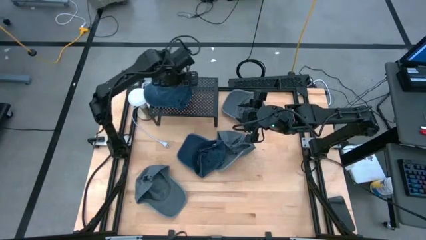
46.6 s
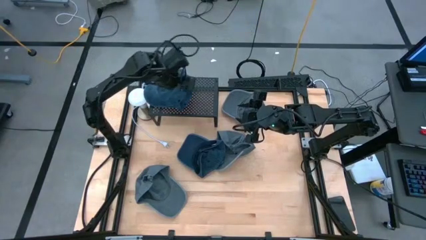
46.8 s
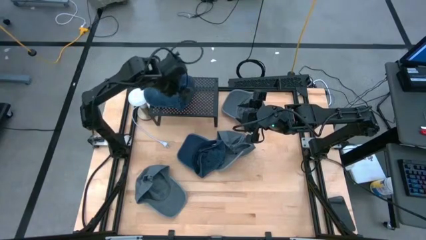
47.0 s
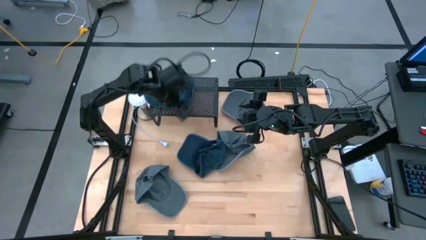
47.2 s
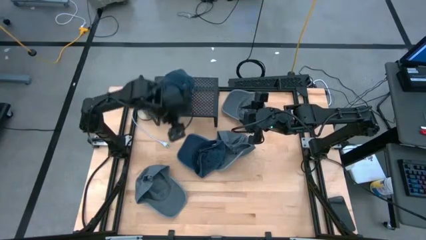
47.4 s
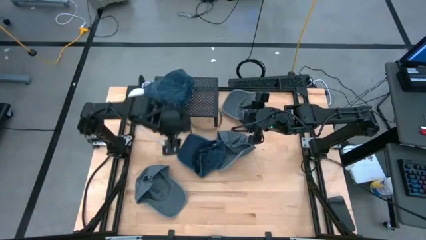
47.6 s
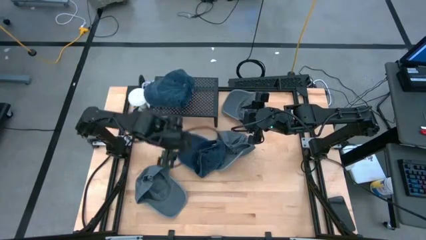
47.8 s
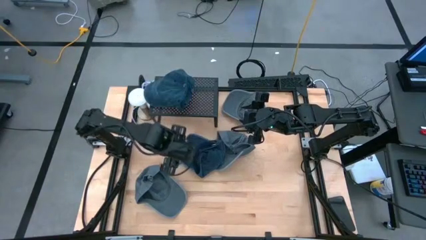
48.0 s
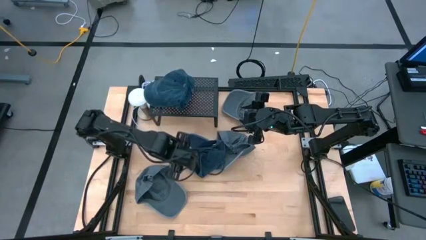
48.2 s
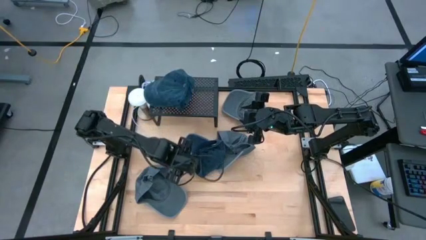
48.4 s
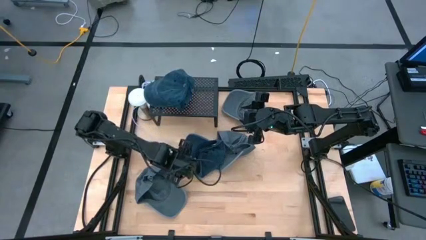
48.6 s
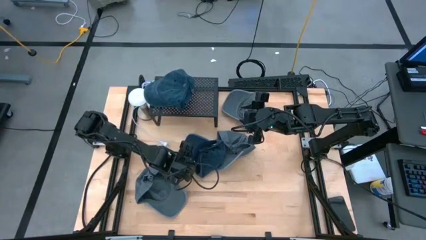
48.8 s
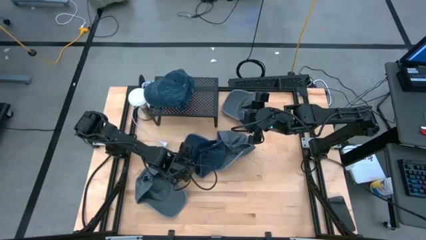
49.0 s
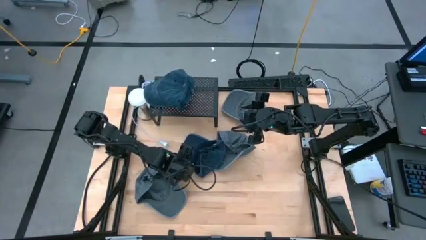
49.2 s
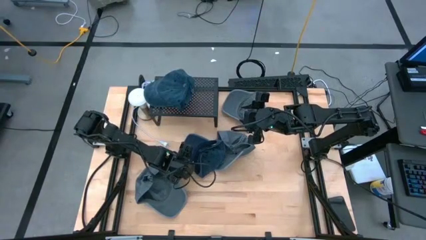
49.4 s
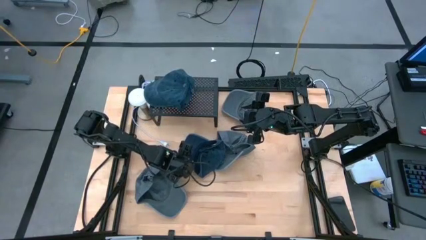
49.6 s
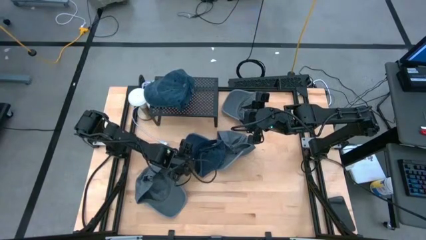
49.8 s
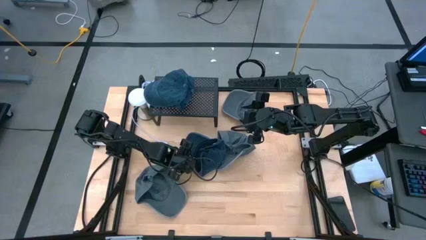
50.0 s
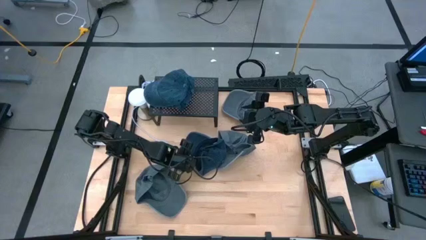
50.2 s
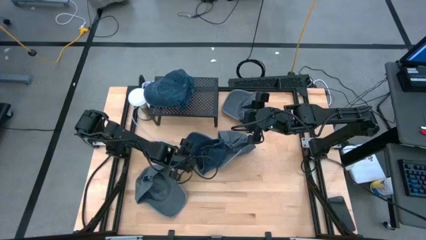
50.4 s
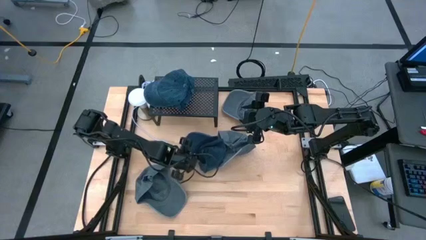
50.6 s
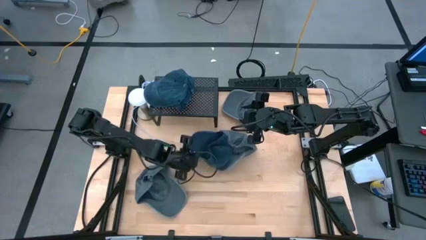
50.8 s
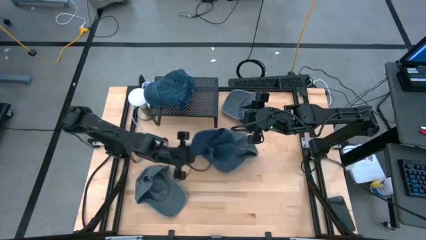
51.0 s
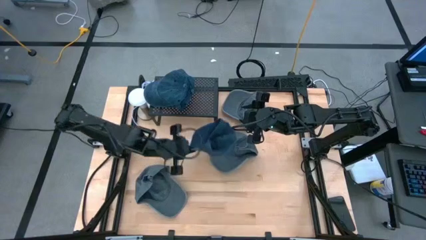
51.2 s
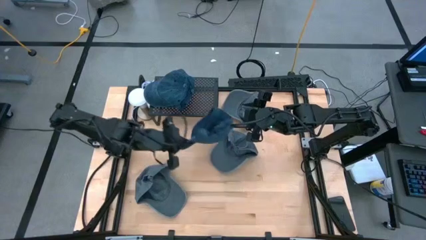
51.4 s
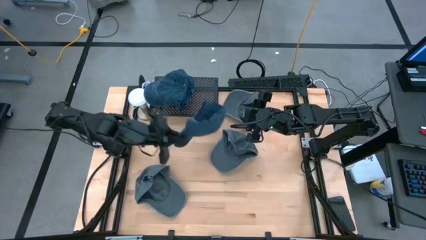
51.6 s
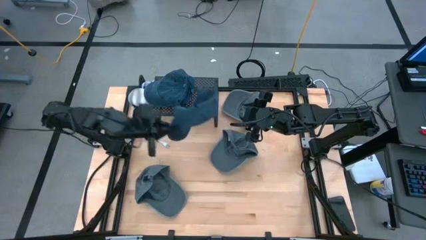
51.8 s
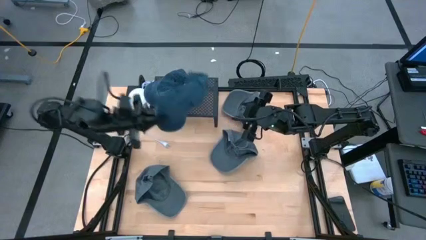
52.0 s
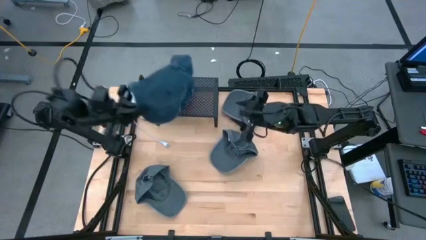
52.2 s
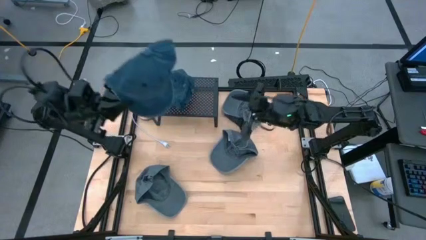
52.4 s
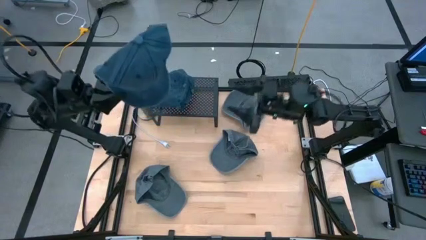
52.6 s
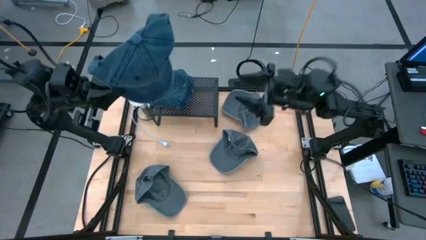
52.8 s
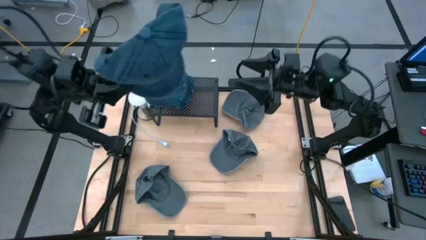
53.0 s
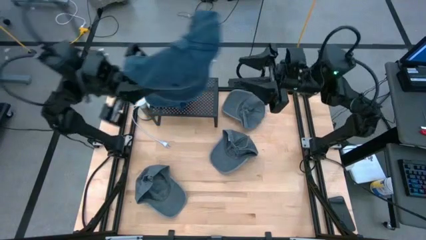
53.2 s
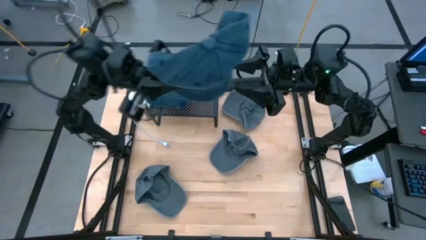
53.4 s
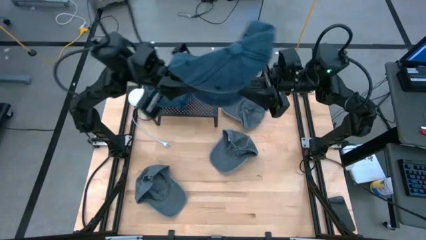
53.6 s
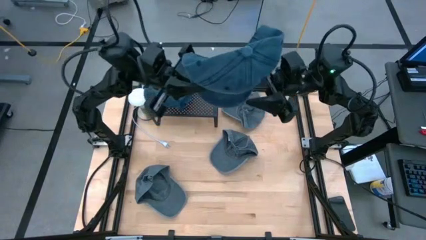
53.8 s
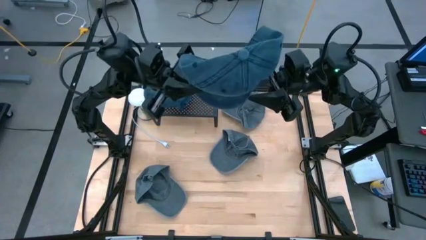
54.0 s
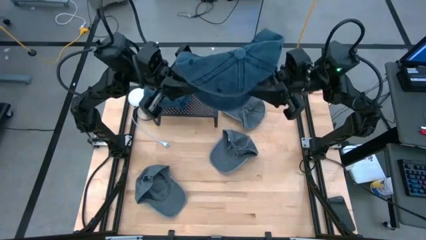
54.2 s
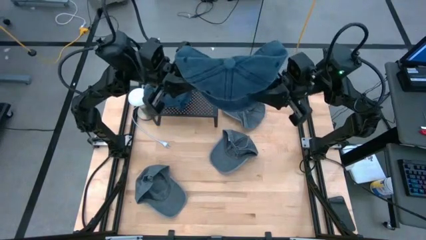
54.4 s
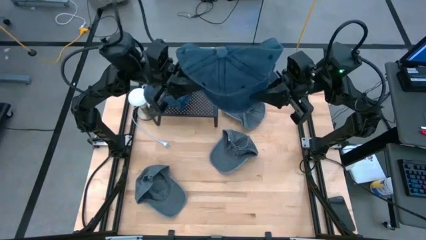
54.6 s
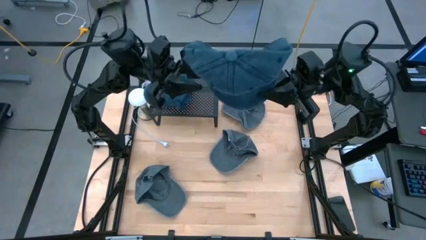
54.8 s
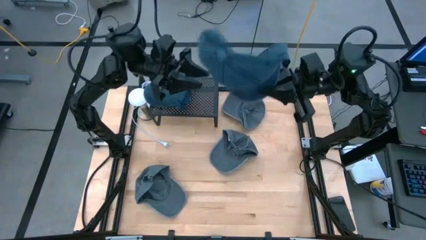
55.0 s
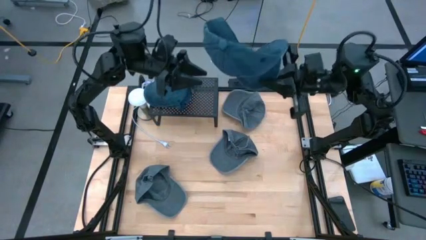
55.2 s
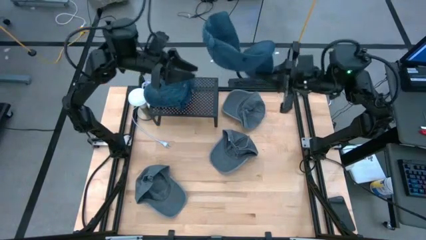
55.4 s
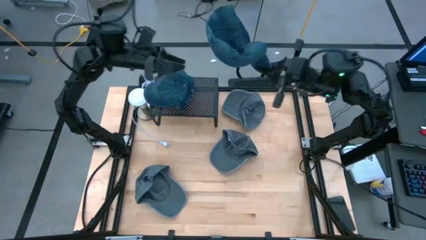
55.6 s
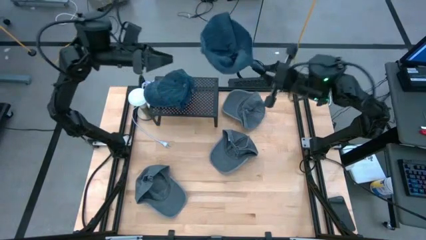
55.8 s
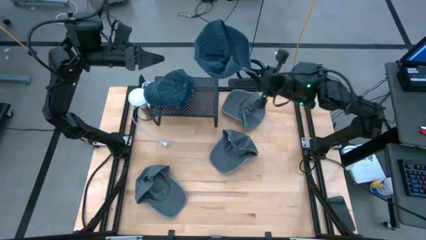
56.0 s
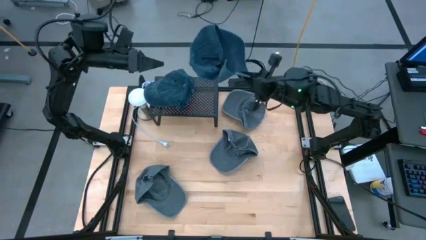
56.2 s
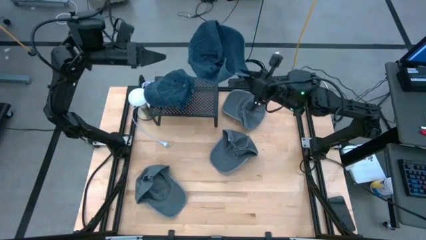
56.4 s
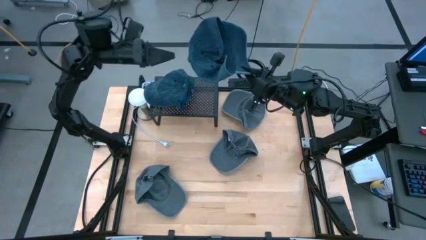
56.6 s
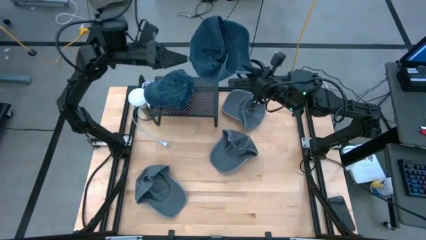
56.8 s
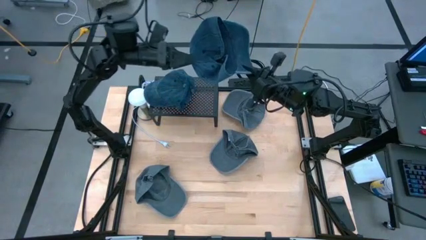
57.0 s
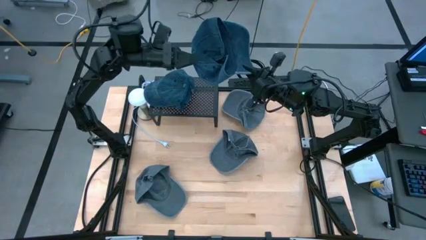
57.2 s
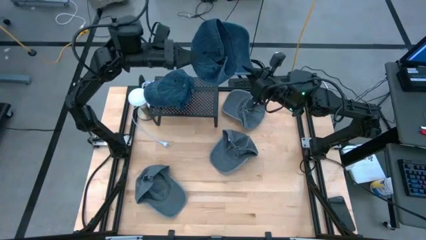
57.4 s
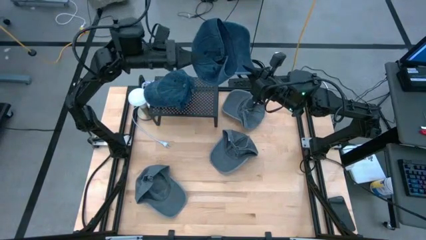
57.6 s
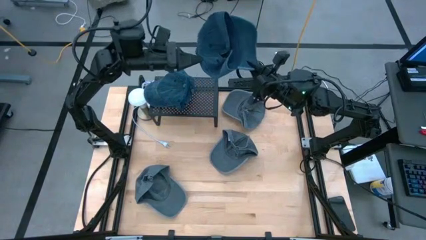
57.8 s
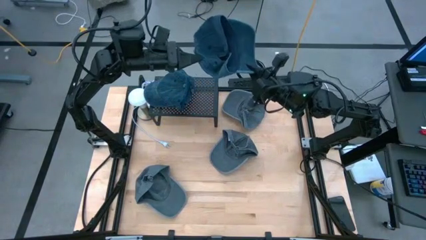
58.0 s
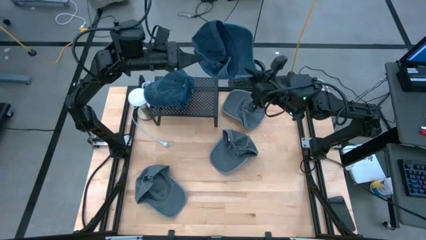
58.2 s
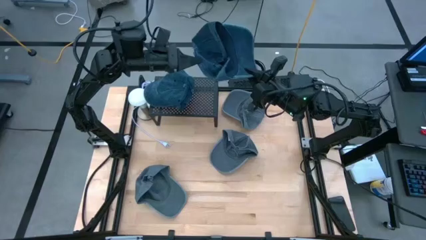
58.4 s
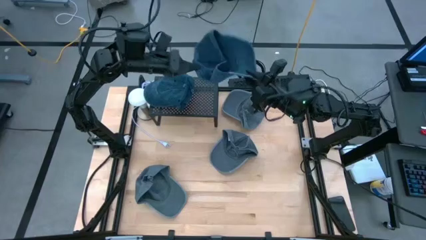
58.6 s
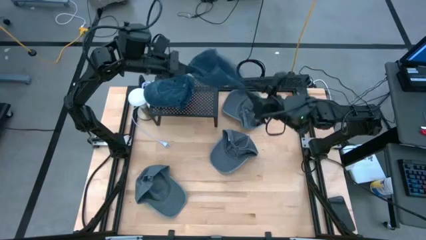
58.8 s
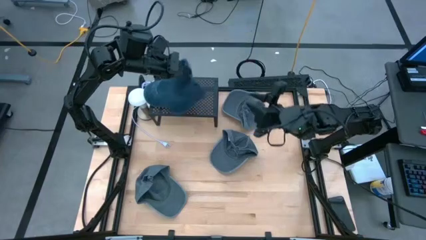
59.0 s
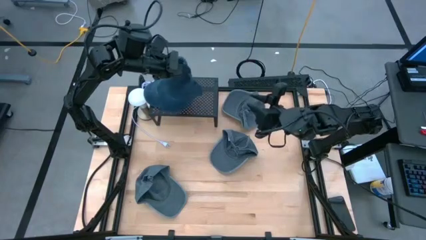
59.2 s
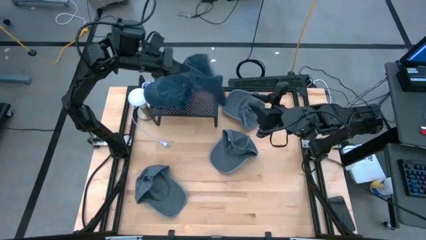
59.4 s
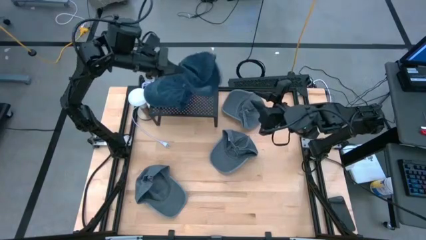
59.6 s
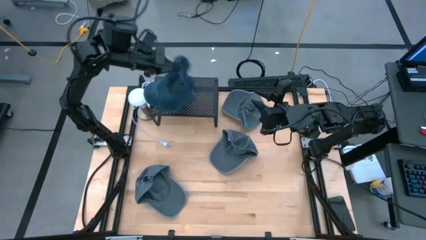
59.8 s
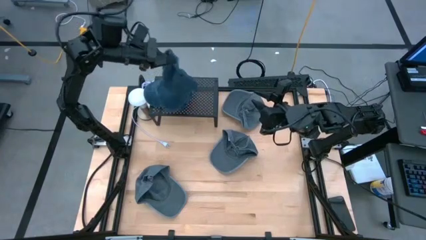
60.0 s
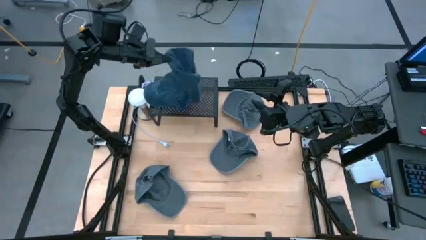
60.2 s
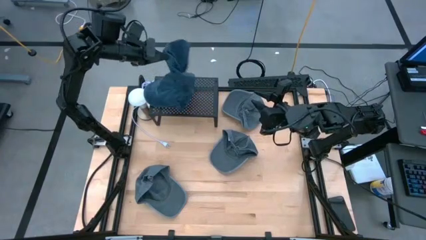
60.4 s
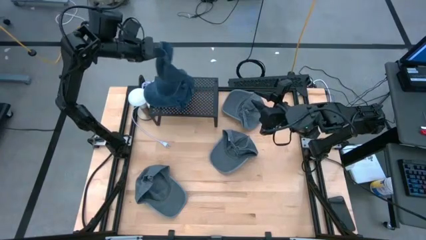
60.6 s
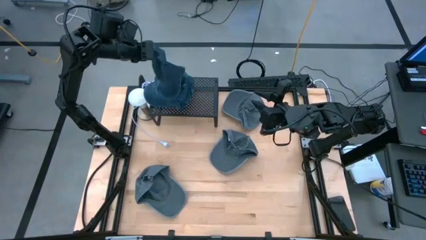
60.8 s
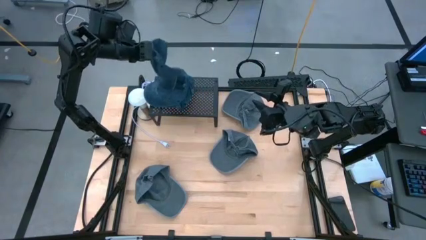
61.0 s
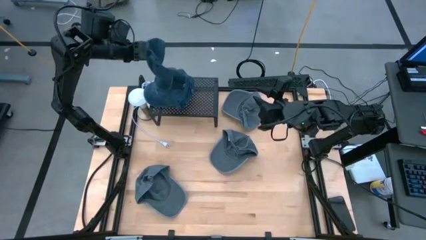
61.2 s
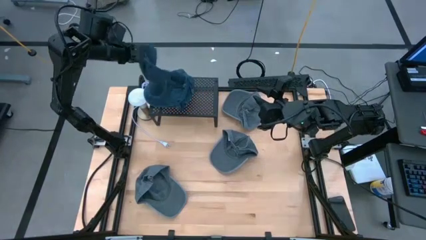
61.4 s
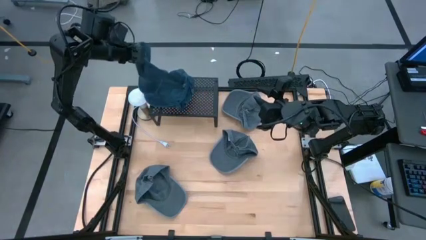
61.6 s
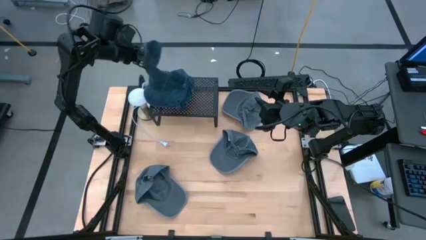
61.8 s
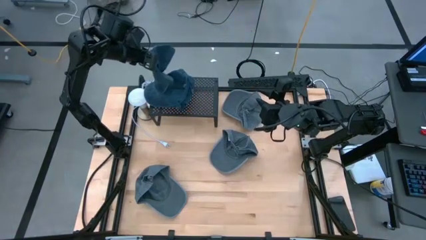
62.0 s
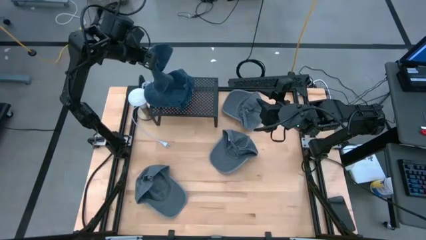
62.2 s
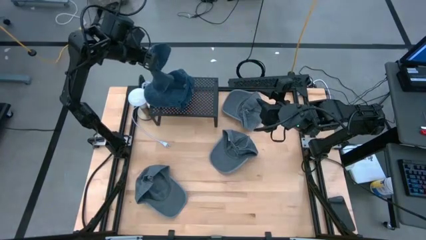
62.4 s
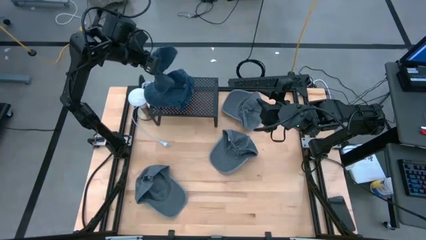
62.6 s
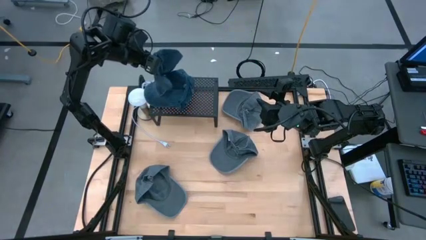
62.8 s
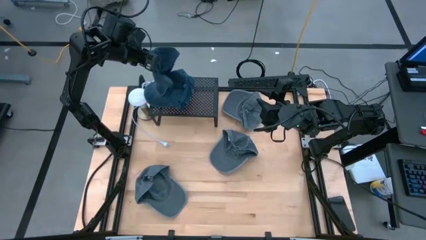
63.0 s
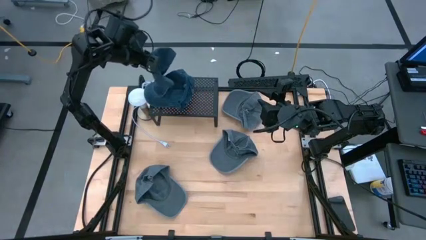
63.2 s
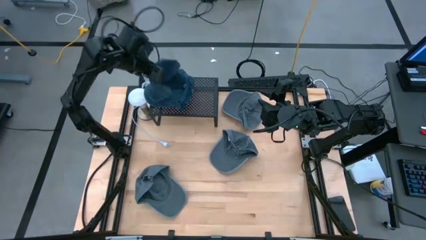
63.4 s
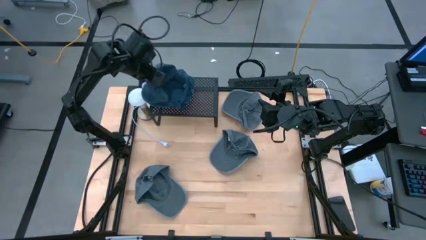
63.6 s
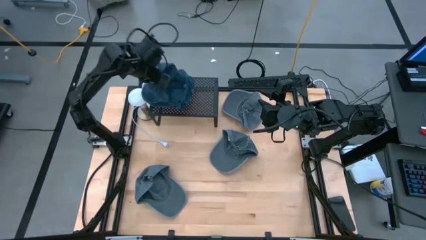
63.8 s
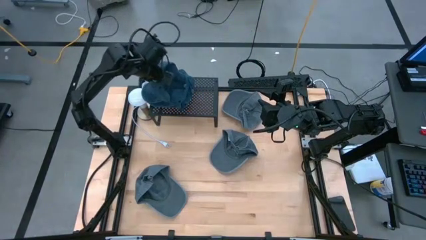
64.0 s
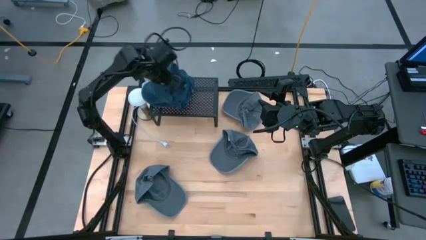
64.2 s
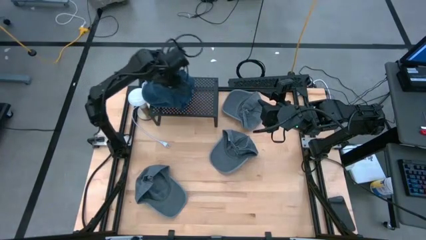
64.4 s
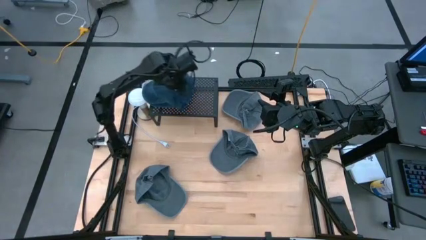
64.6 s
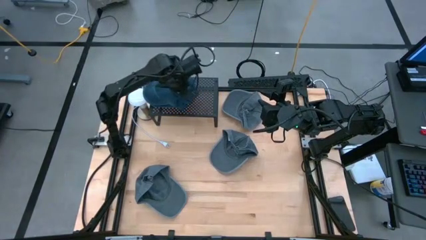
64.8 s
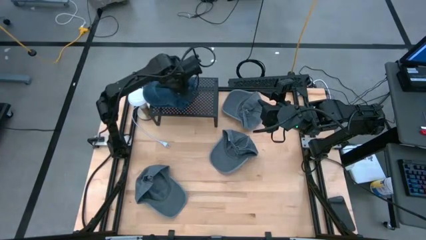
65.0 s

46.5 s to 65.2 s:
Task: Pick & Place hat
Stack the blue cap on the other blue cap on the shelf
